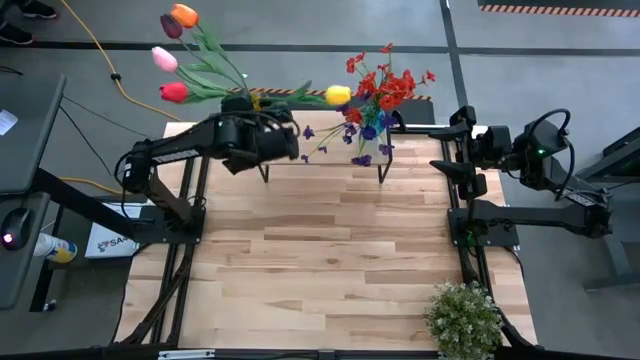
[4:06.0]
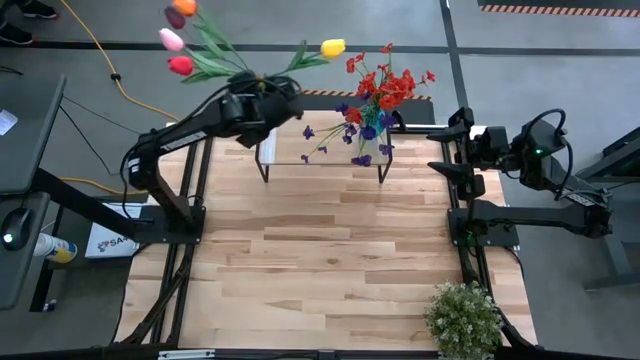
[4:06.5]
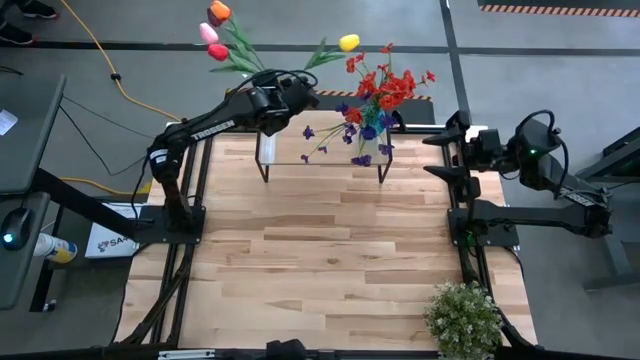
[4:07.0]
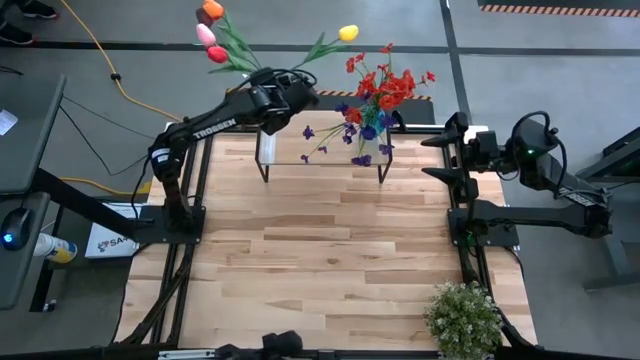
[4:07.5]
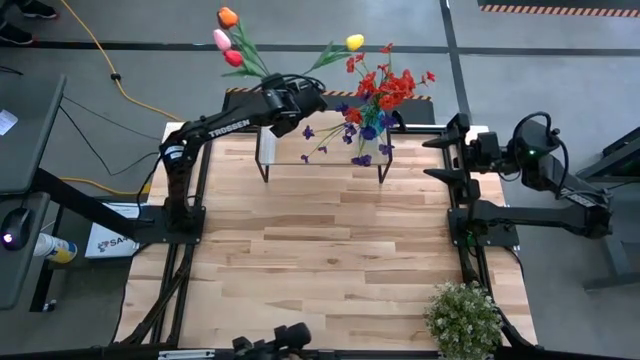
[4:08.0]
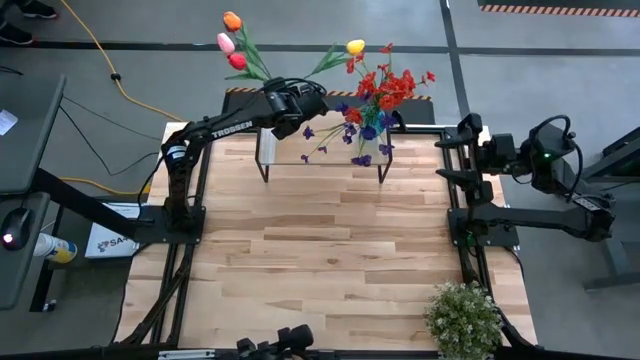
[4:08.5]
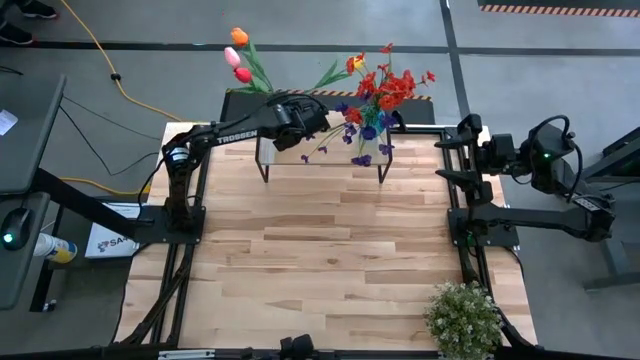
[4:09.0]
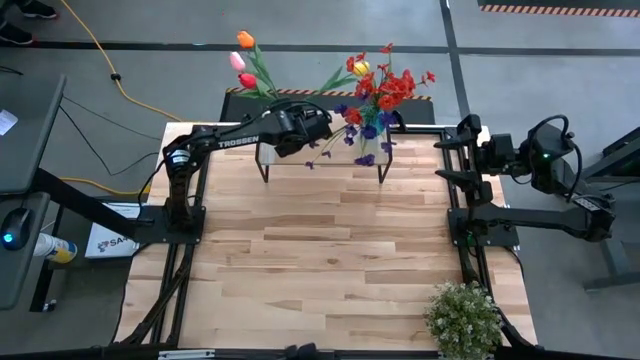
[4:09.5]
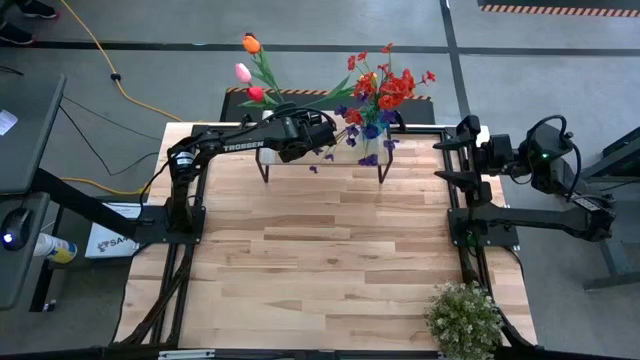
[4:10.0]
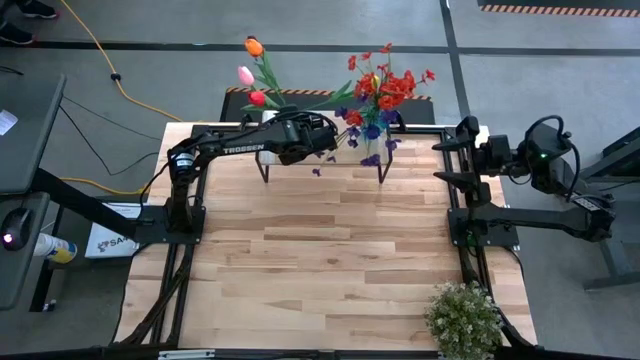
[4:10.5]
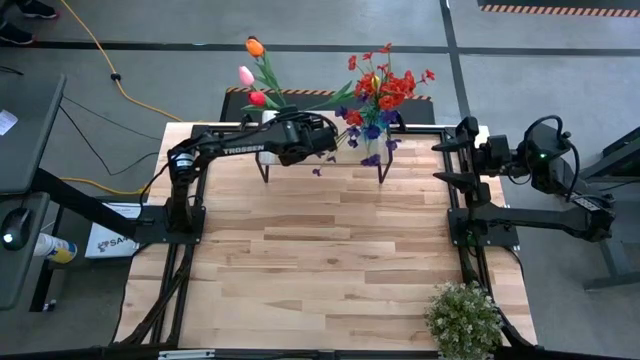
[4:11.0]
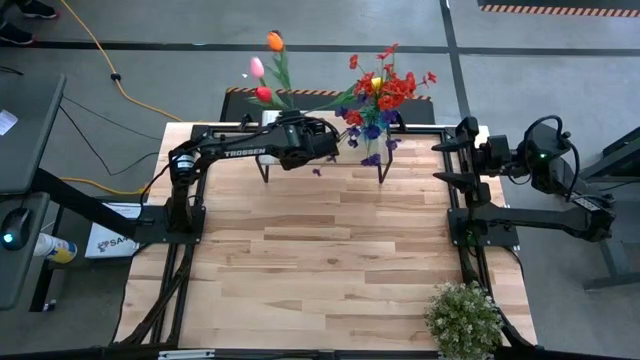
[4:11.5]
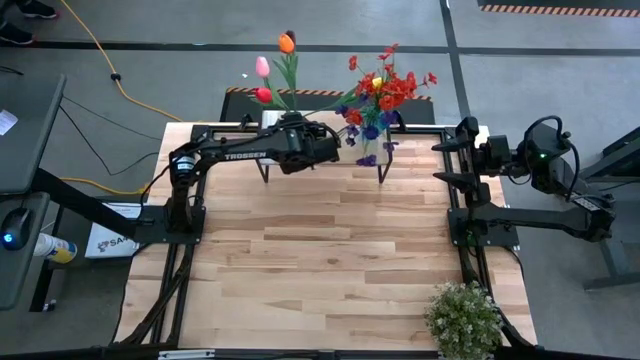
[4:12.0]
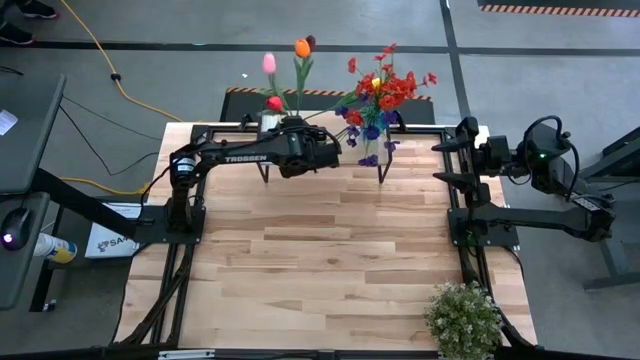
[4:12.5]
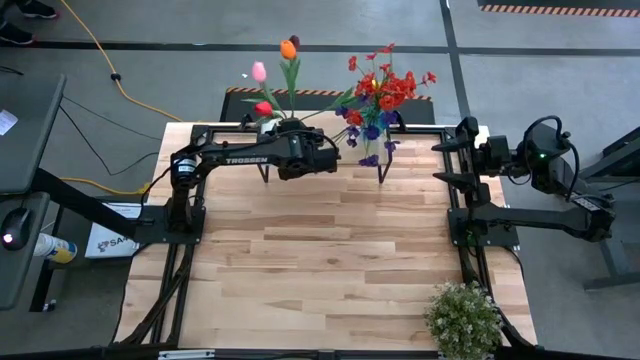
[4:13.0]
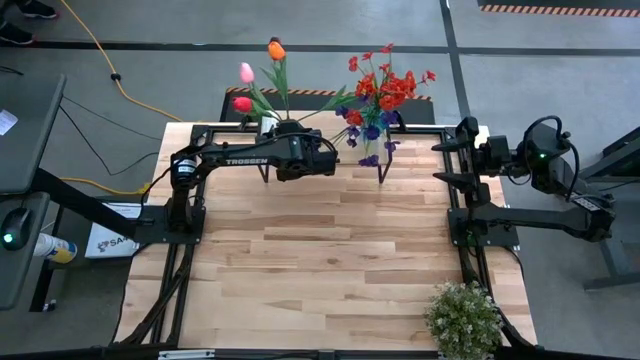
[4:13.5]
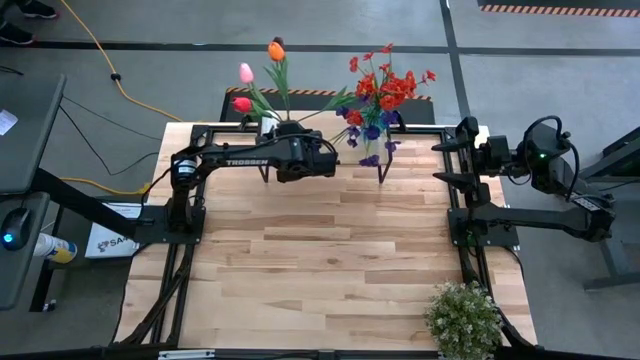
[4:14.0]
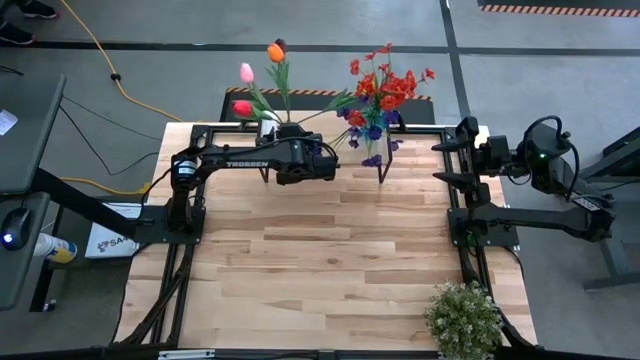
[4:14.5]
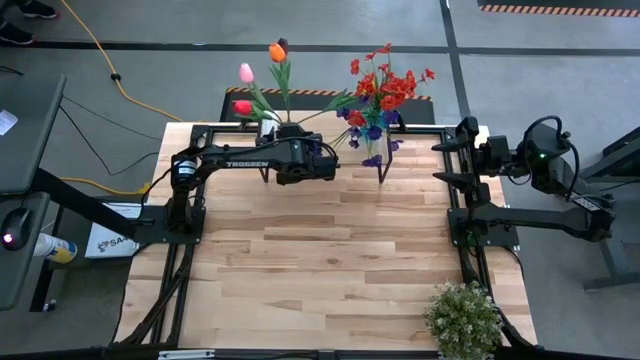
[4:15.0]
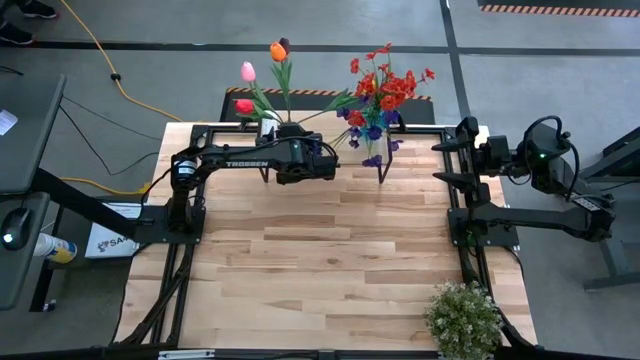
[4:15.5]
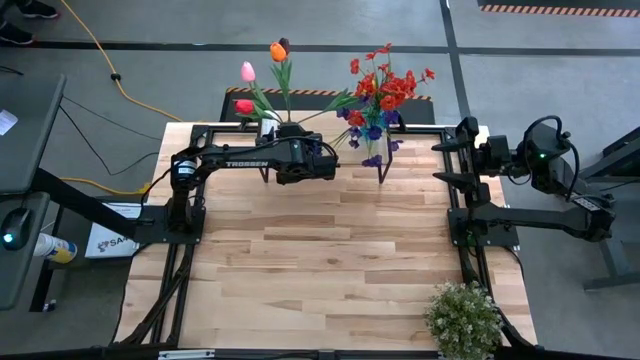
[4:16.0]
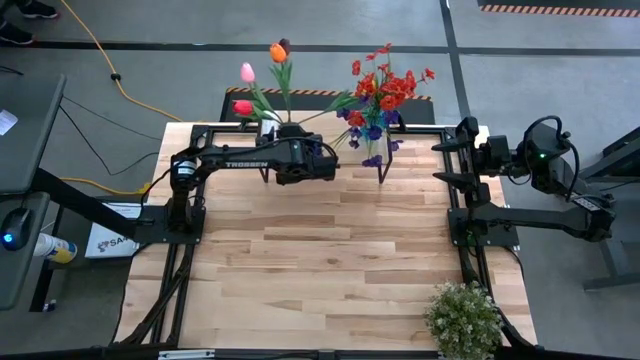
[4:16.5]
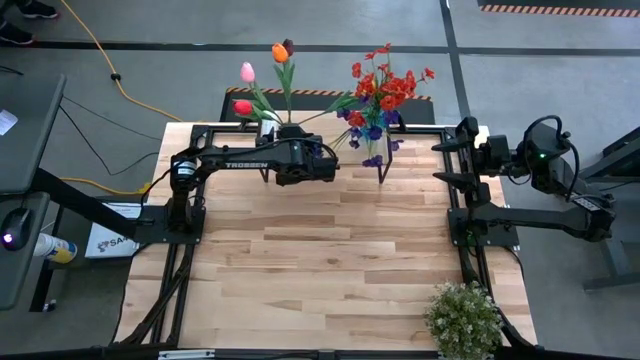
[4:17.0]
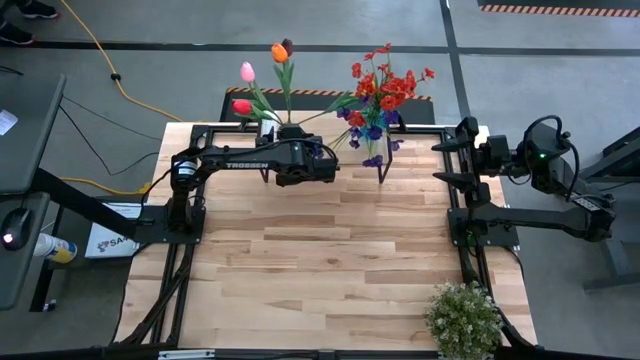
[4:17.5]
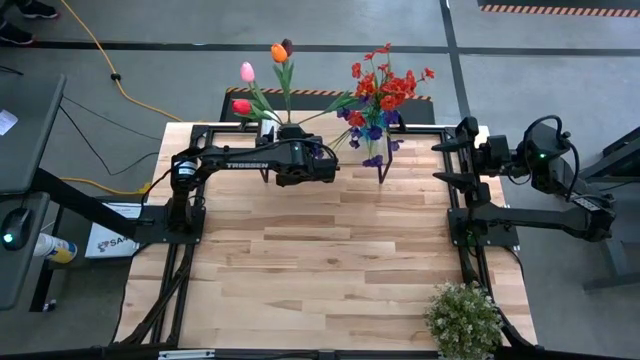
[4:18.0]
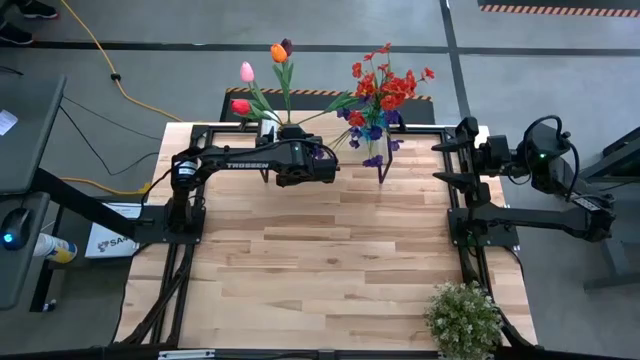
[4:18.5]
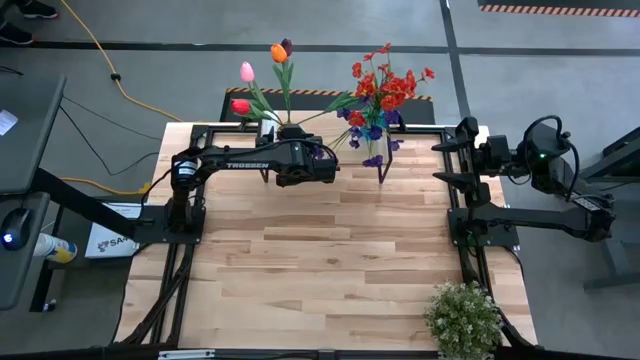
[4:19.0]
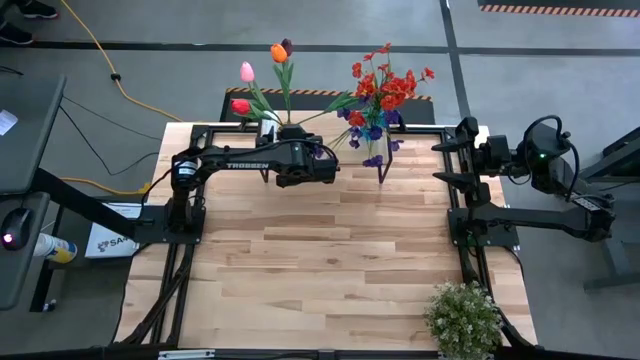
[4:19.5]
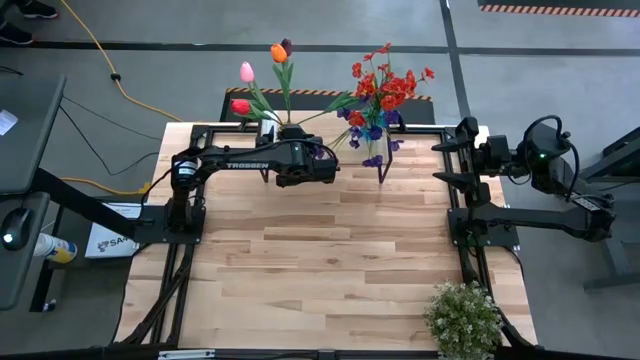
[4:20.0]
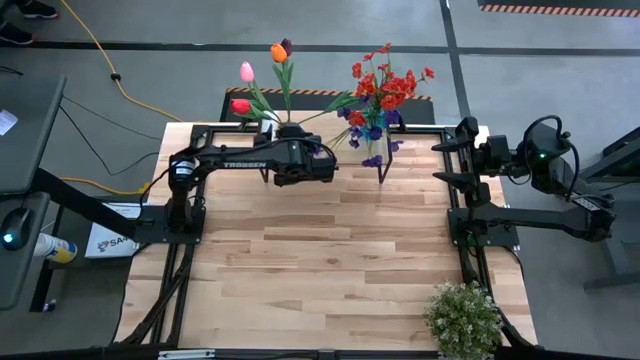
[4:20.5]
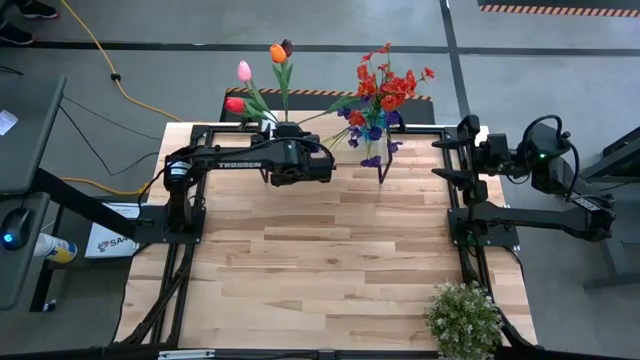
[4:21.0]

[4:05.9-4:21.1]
Task: Pick and place flowers into a vace then onto a shelf
Put the yellow vase with flowers on the shelf

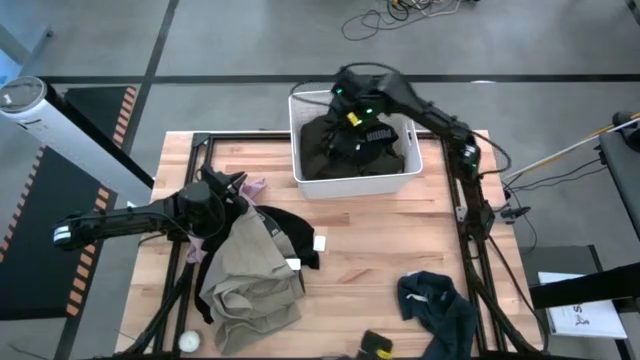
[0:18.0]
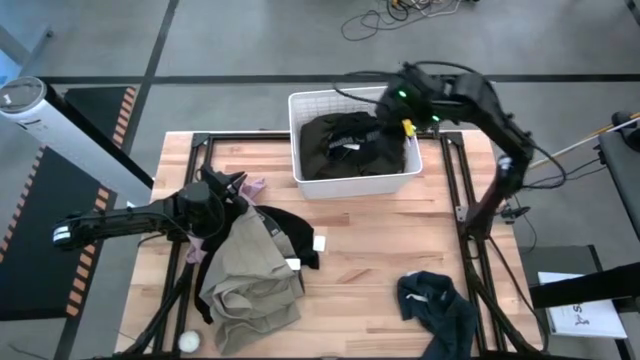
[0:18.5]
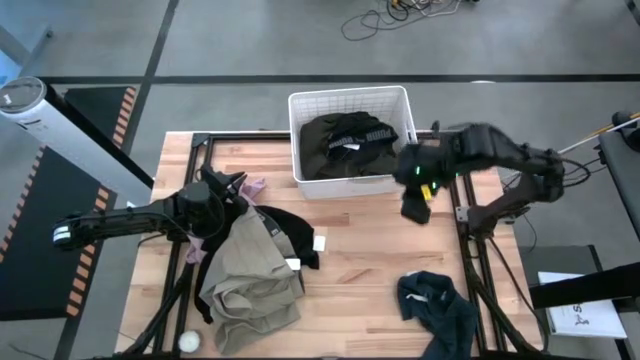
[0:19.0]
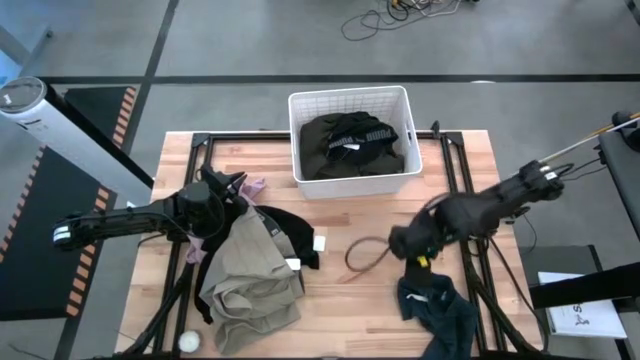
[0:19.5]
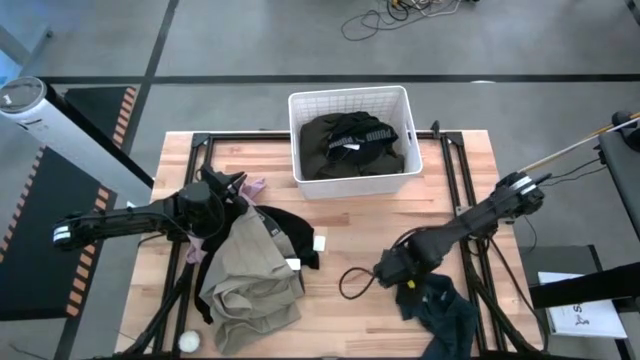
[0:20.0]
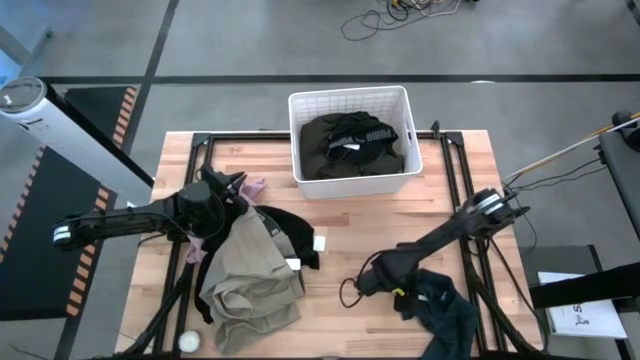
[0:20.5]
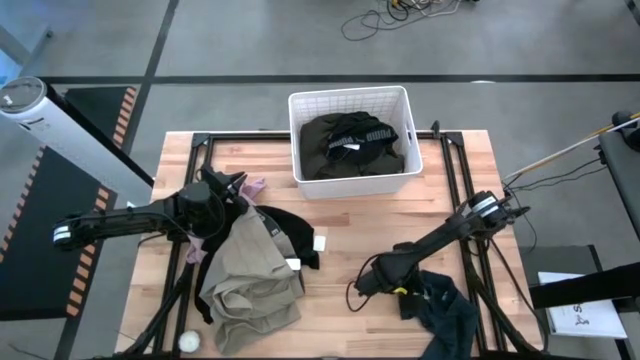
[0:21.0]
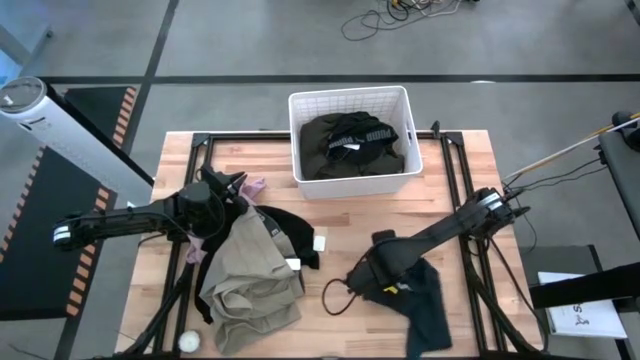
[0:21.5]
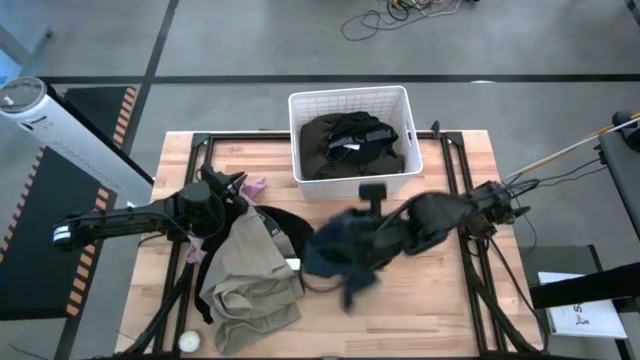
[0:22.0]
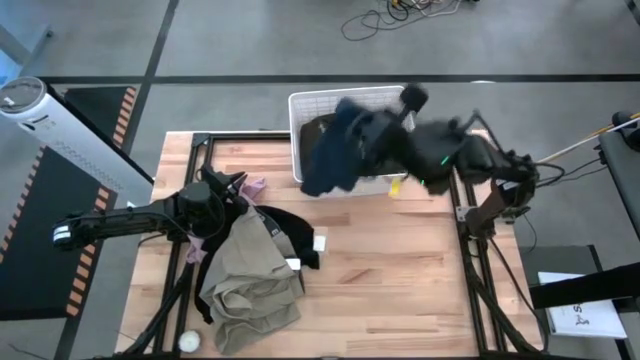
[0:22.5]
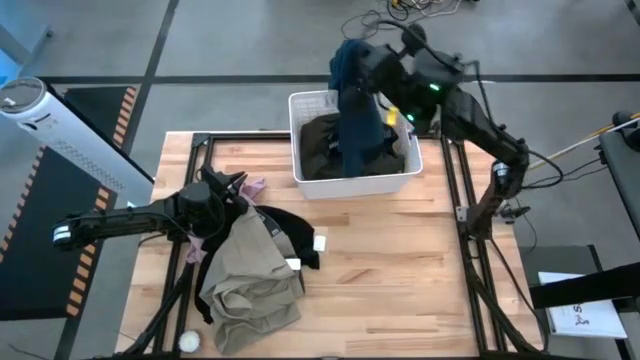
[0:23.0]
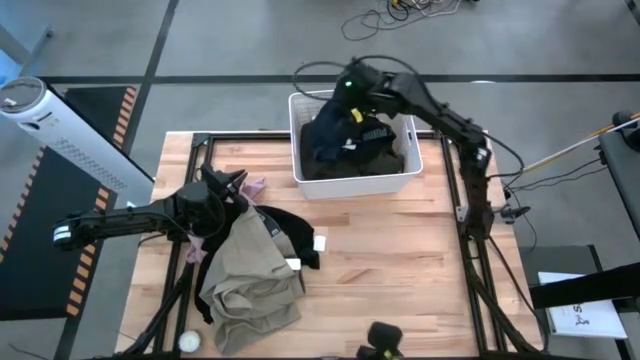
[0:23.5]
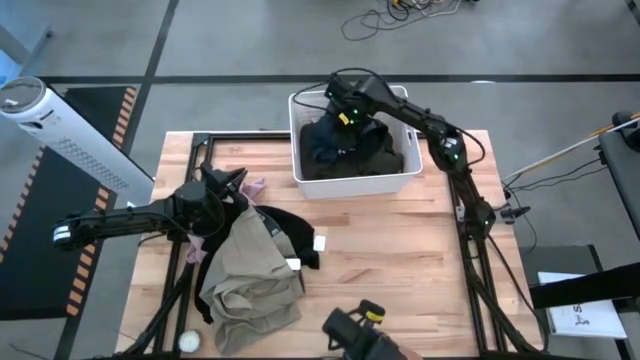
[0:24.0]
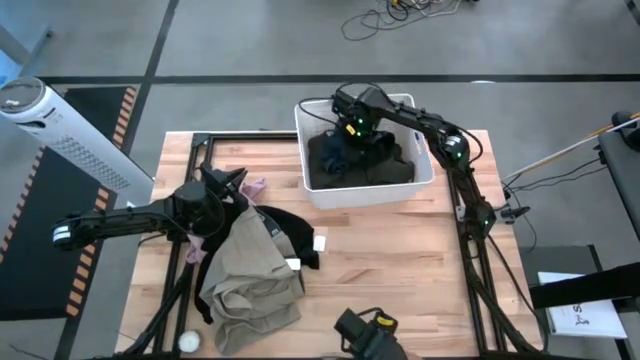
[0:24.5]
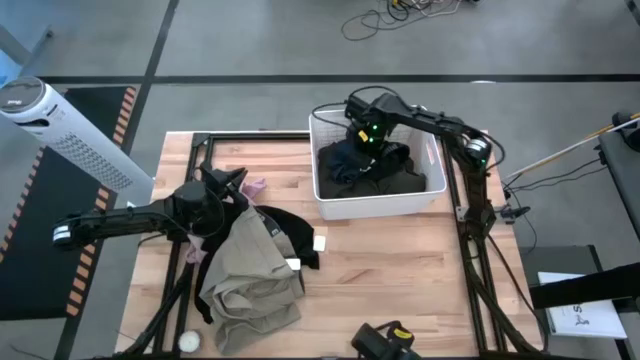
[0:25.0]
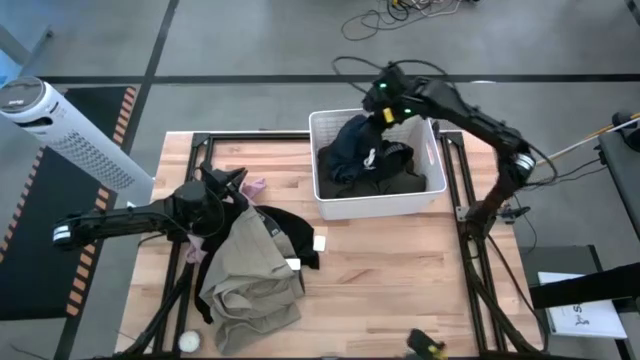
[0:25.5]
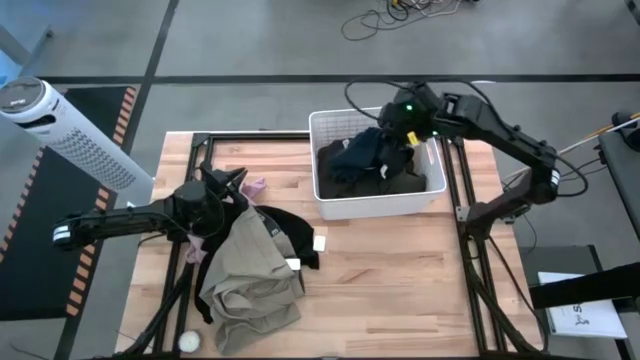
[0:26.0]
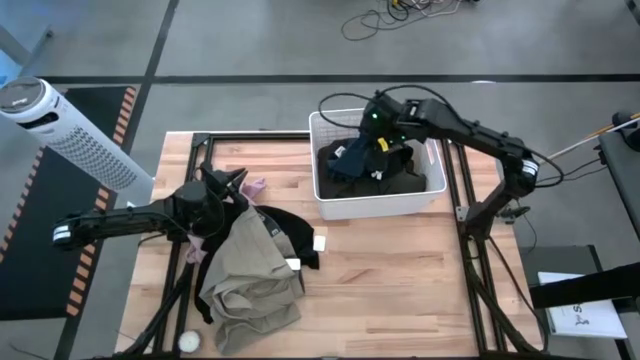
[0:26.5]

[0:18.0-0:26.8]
Task: Sort clothes
Put the blue shorts into the white laundry bin
